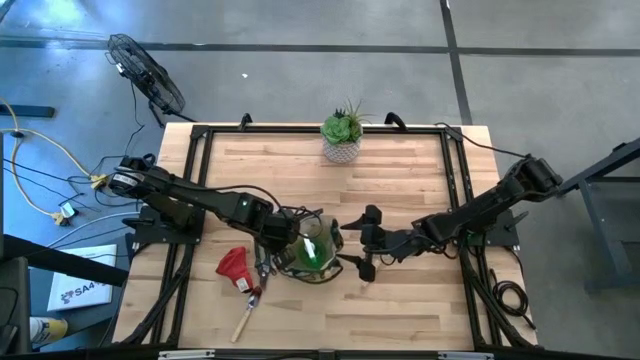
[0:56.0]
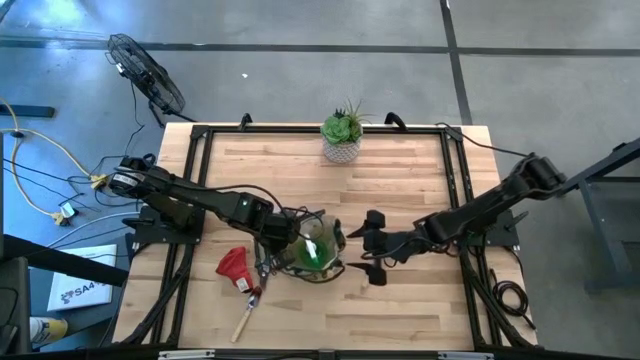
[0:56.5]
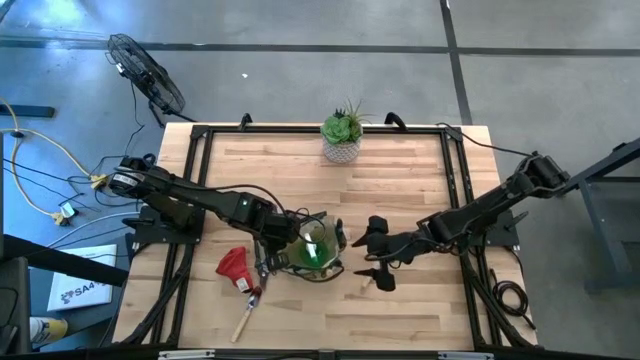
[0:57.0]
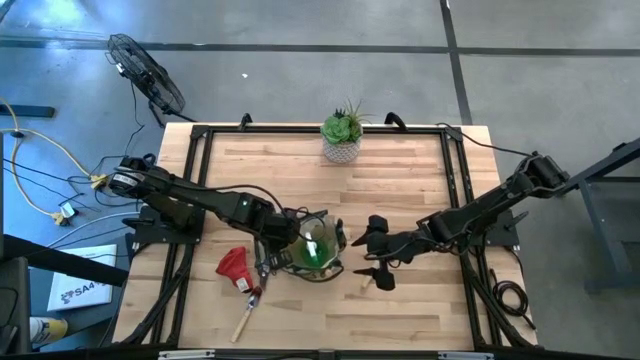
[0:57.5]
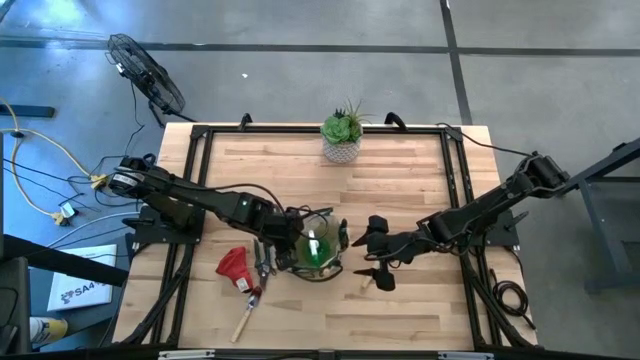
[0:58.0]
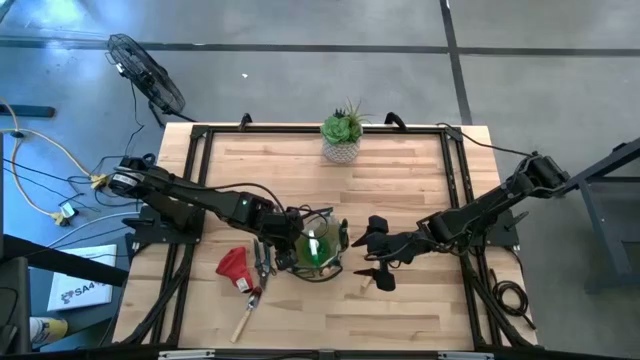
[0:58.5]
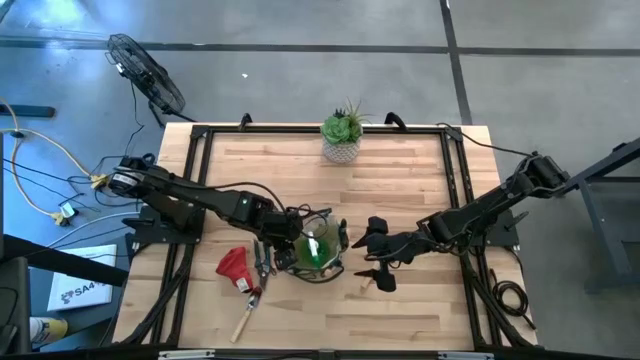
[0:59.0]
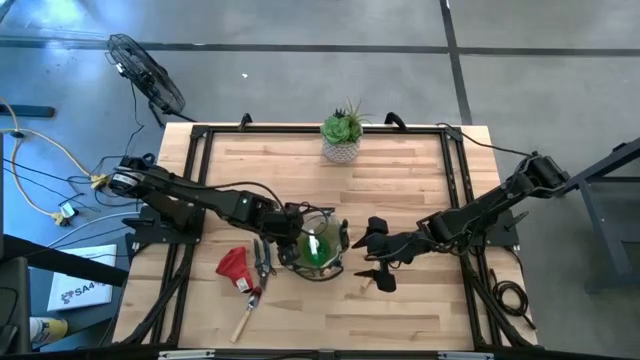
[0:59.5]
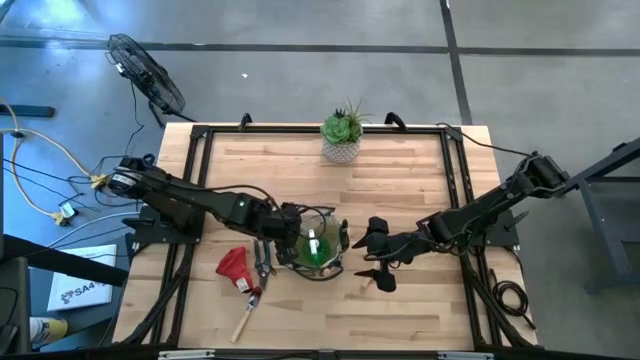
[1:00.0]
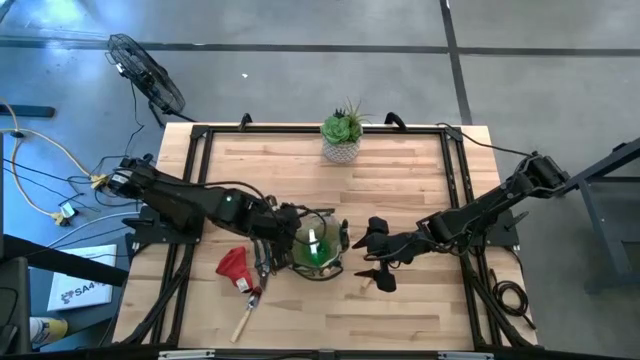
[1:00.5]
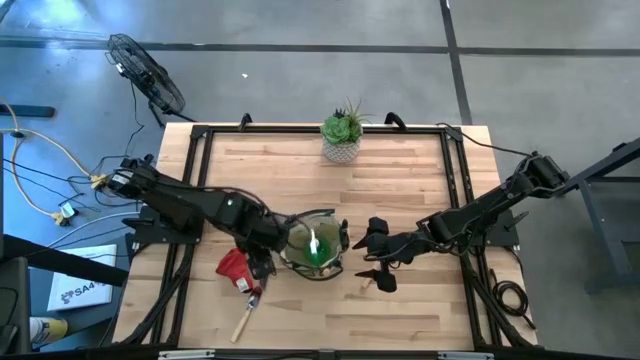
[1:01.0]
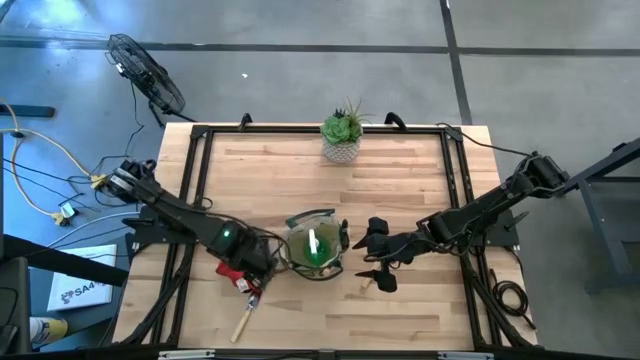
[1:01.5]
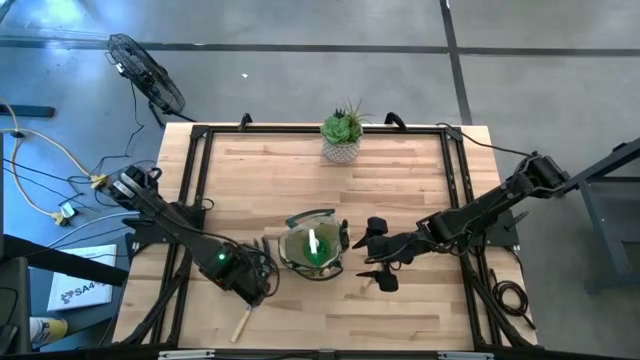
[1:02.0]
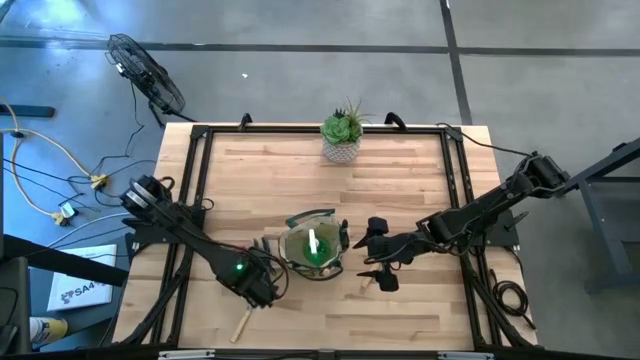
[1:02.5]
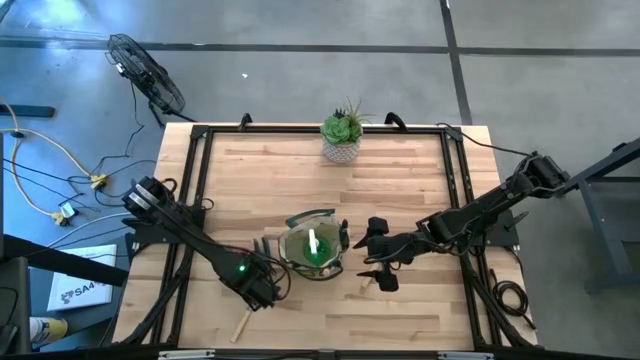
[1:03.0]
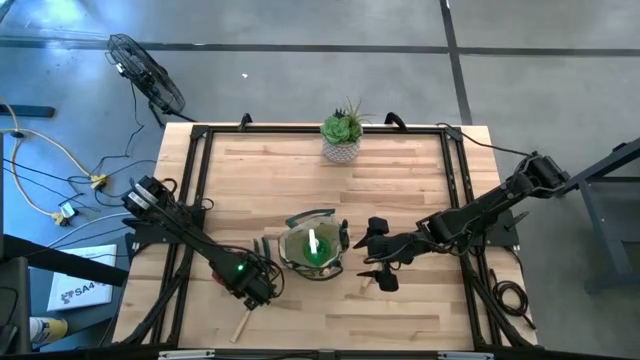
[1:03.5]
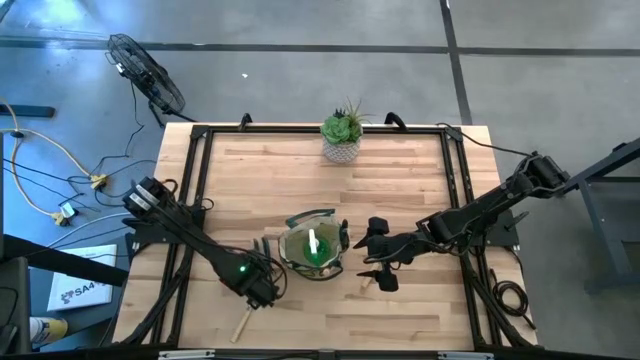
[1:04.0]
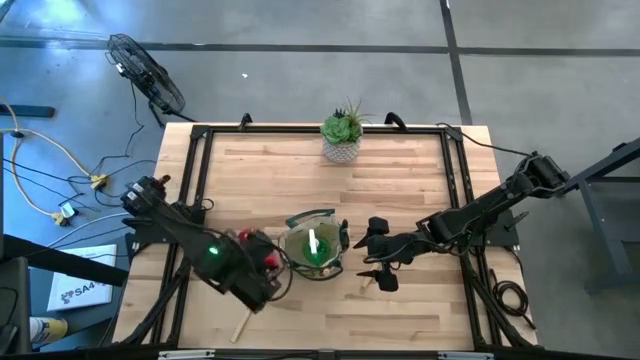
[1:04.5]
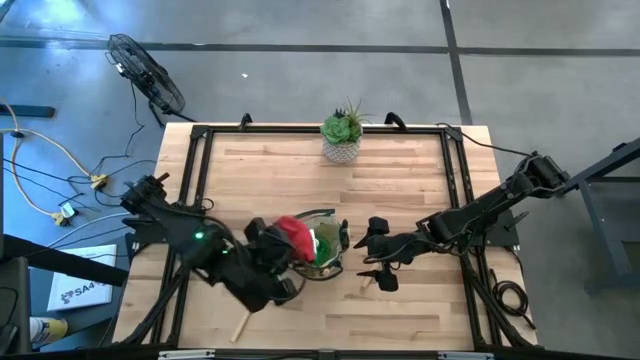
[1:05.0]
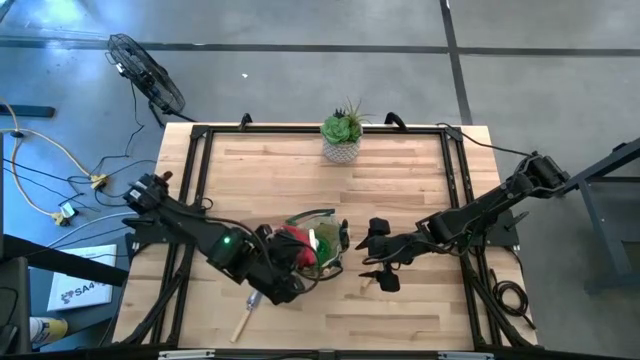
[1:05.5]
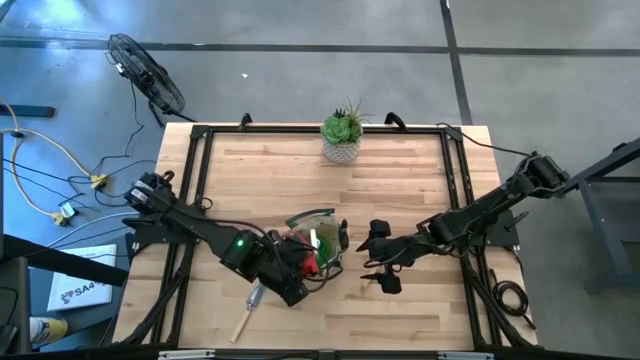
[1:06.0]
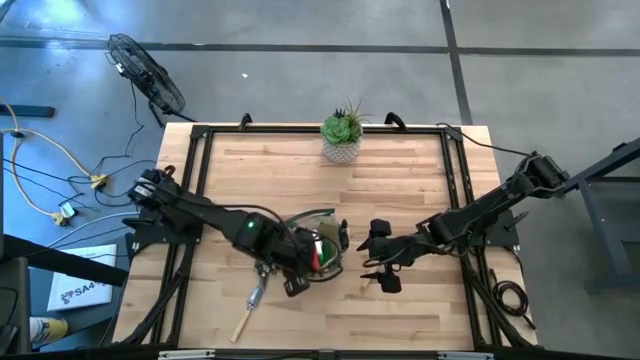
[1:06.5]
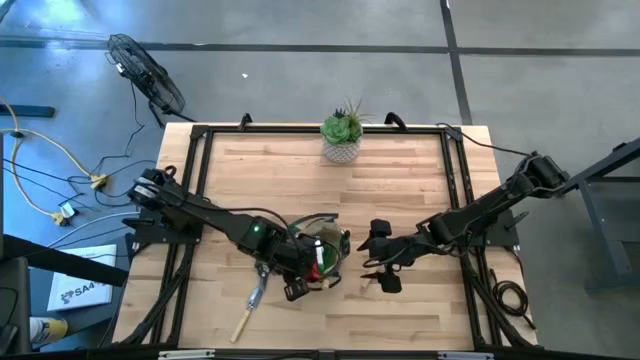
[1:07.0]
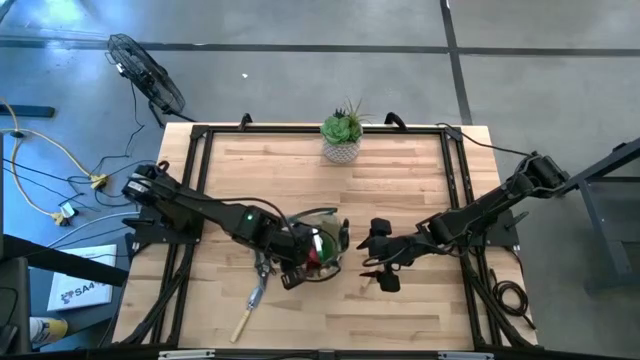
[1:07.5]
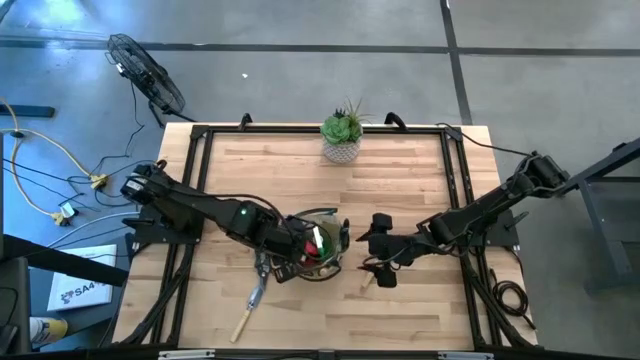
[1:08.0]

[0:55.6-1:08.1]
Task: Pick & Place Garden tools in Gardening bag
Put the red gloves into the gardening bag

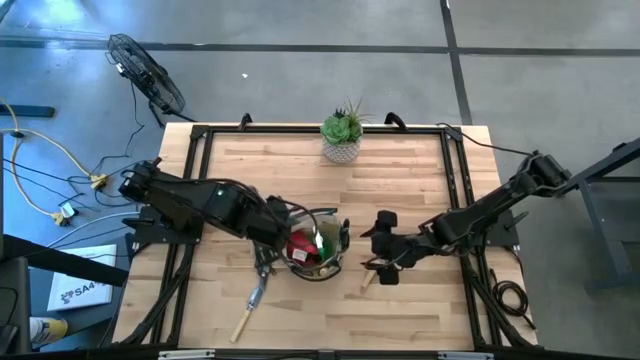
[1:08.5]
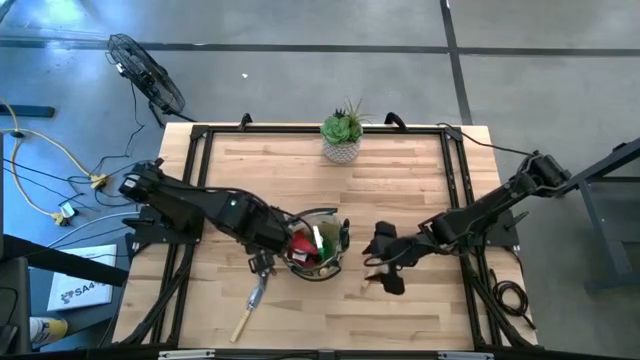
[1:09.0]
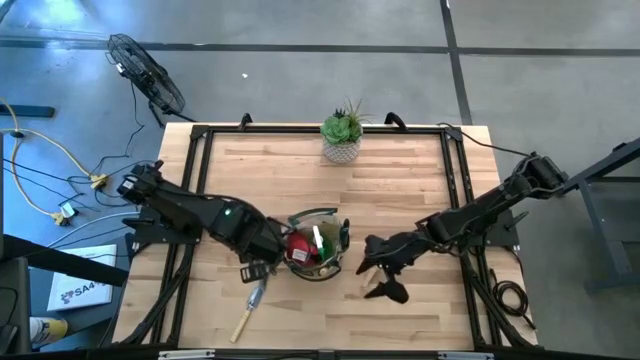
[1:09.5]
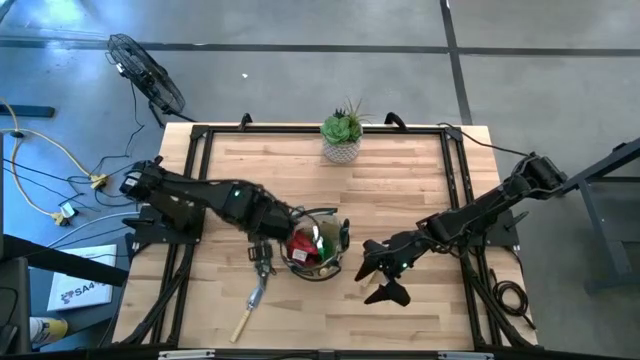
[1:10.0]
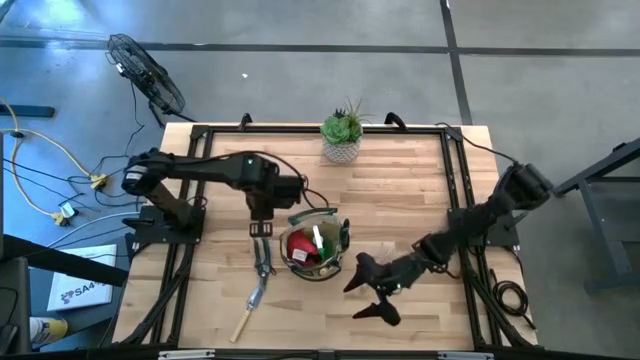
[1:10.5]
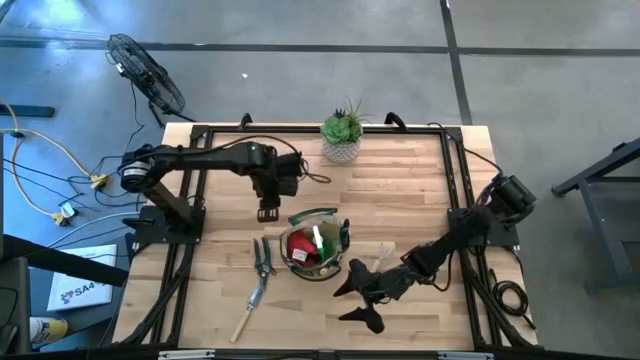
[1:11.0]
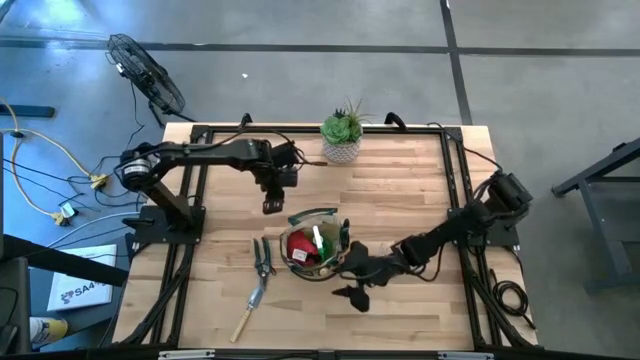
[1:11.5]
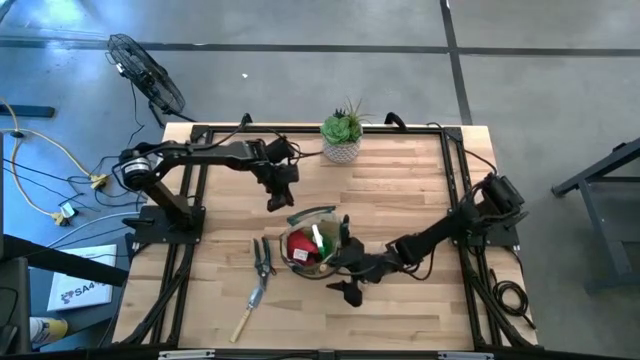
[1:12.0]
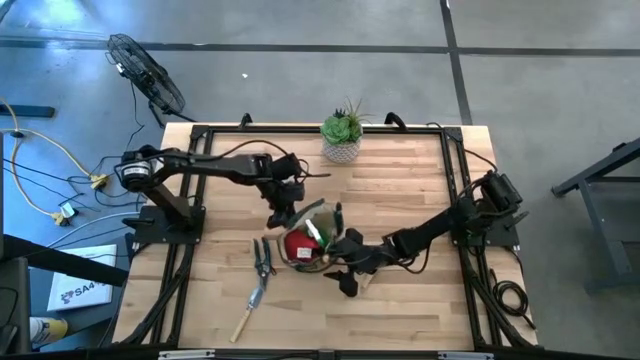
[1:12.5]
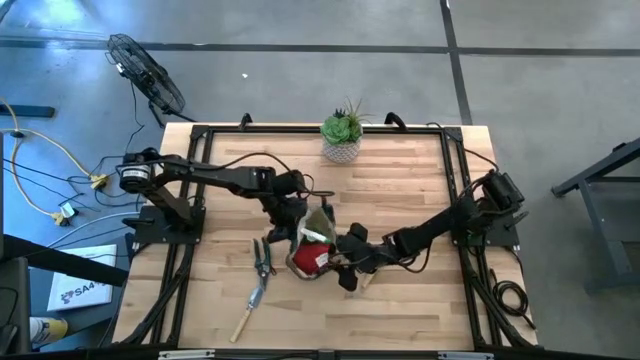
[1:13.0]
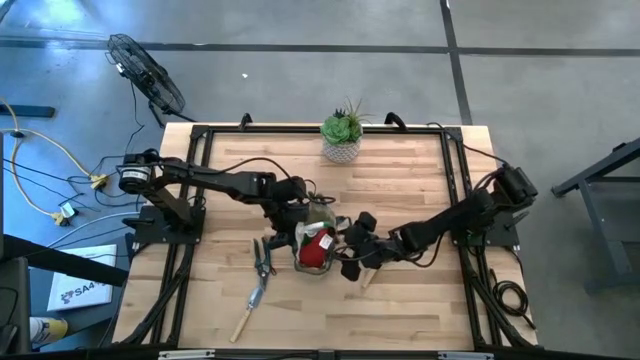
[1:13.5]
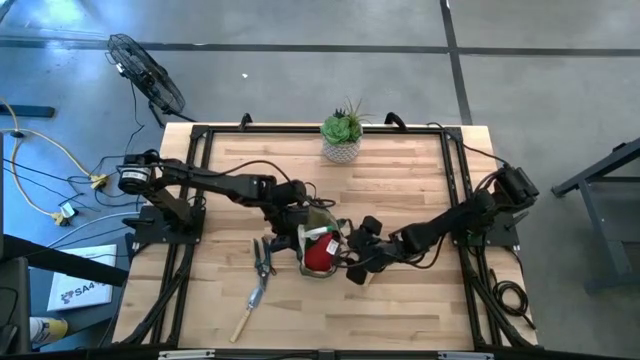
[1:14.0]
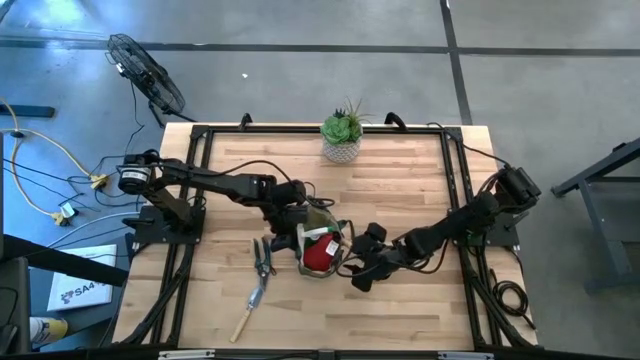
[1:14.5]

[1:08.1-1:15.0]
Adjust the gardening bag

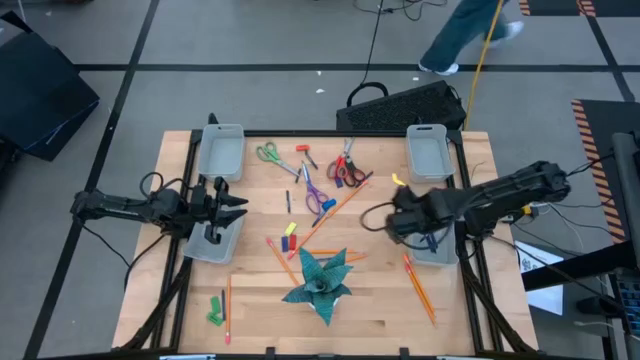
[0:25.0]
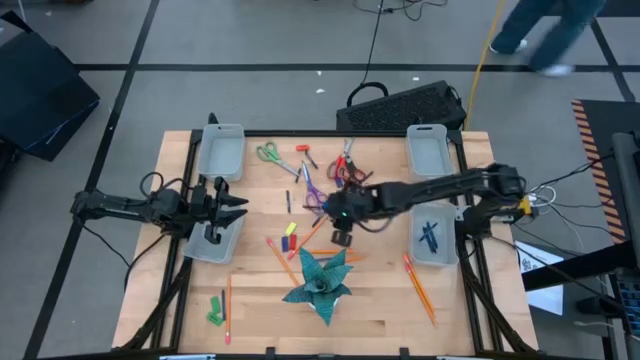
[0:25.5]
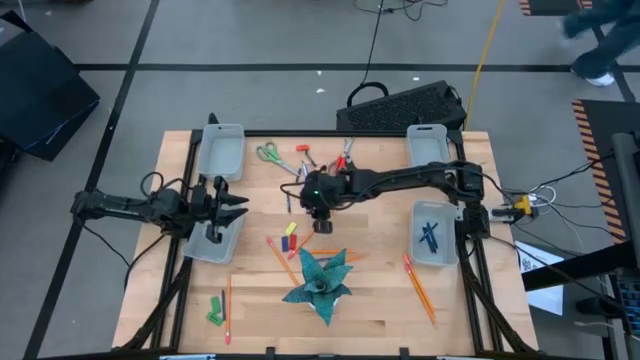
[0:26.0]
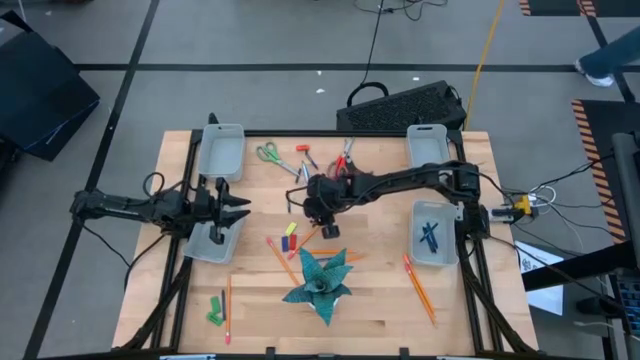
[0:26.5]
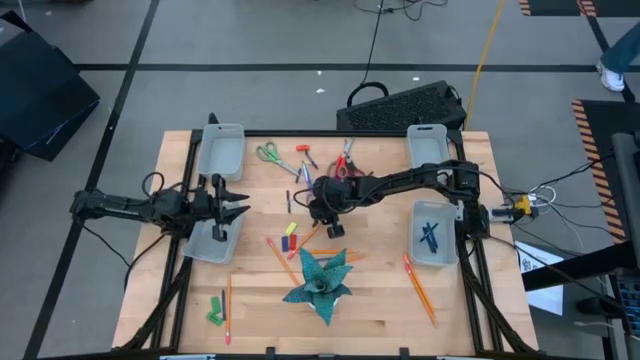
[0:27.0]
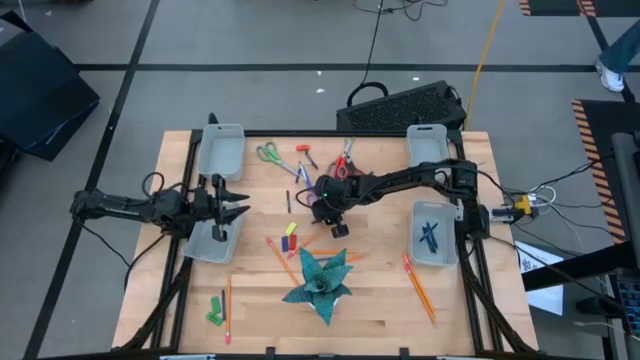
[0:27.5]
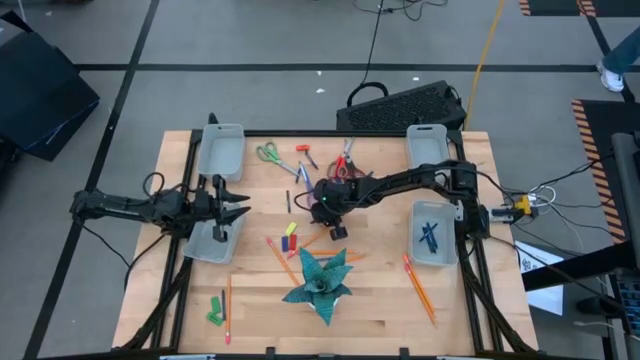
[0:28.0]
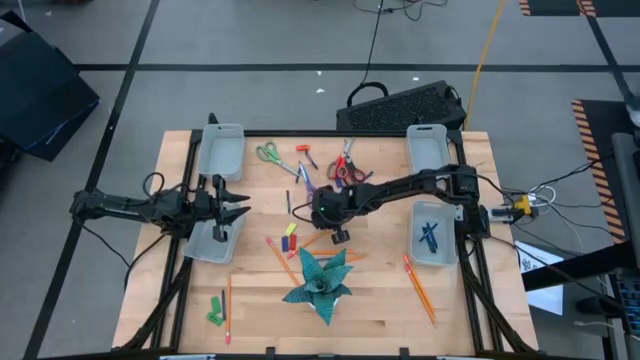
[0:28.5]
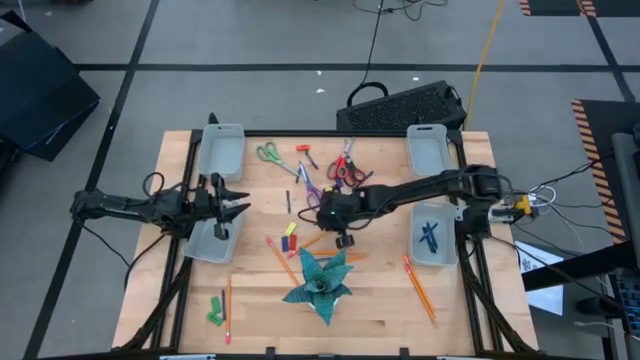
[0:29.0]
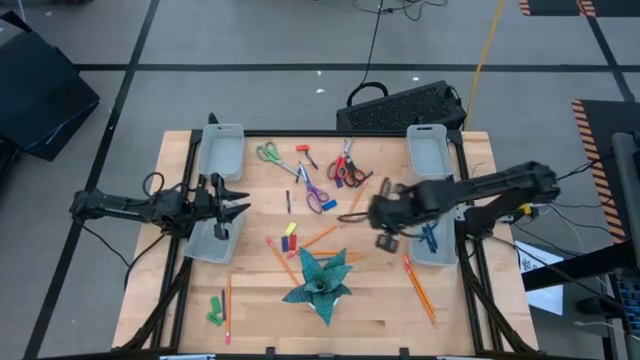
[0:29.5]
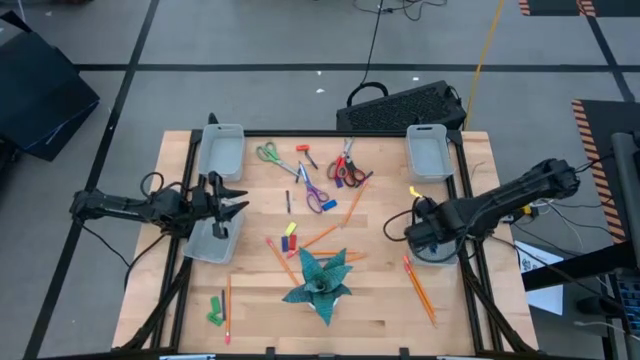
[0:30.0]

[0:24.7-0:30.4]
Task: Sort crayons/erasers/pens/pencils in bins
Put the blue crayon into the bottom right gray bin
